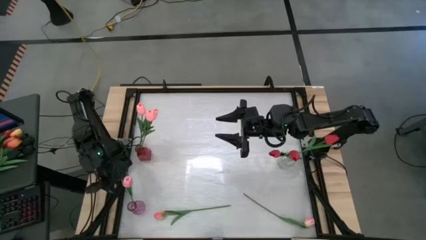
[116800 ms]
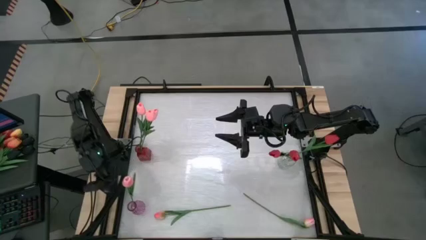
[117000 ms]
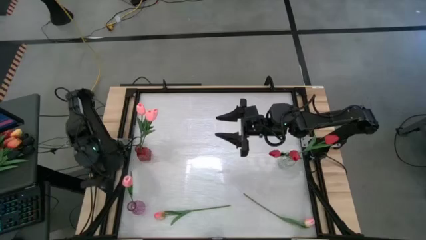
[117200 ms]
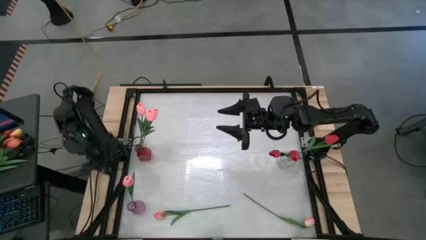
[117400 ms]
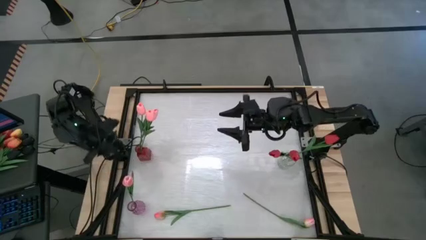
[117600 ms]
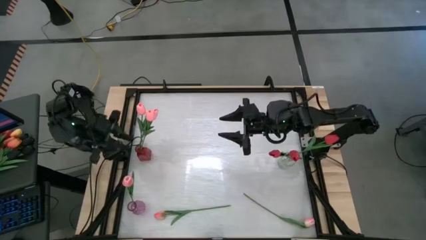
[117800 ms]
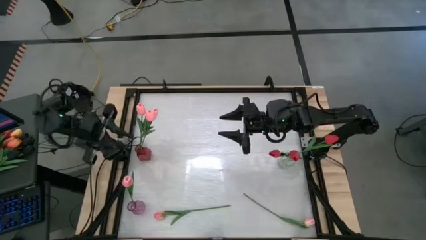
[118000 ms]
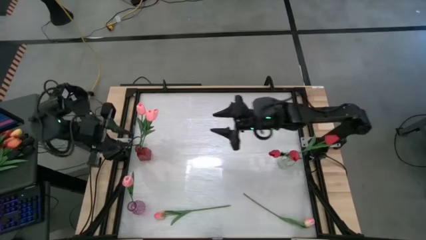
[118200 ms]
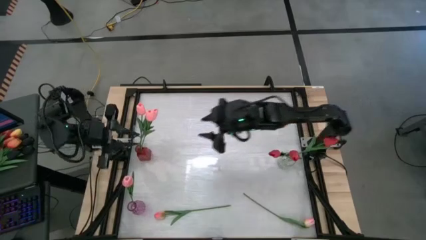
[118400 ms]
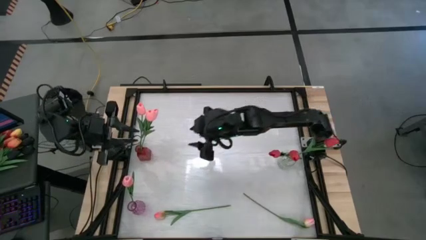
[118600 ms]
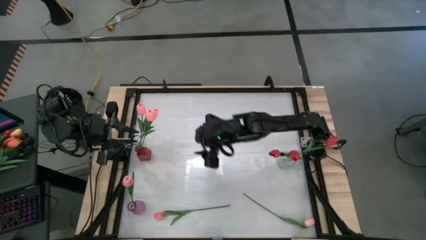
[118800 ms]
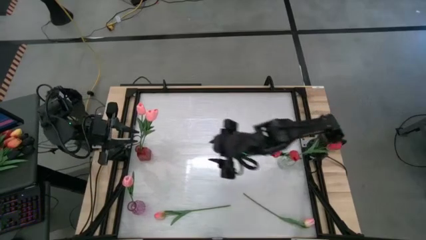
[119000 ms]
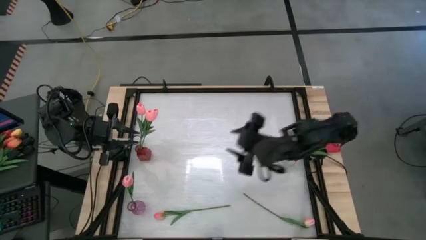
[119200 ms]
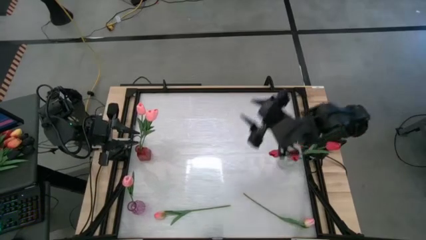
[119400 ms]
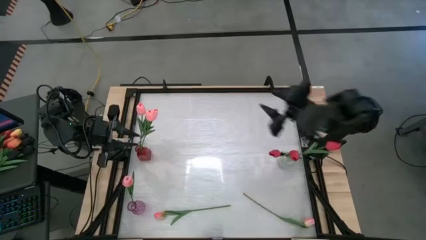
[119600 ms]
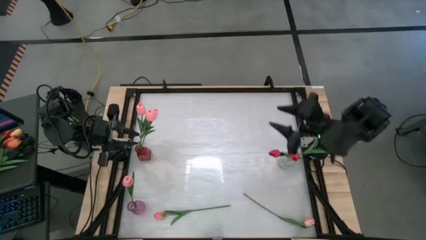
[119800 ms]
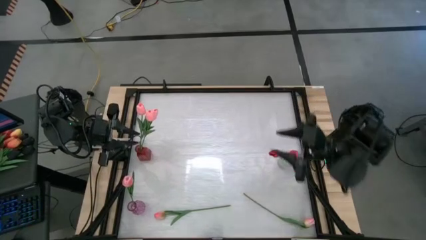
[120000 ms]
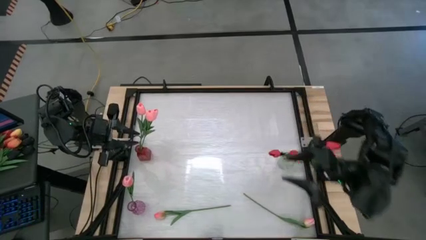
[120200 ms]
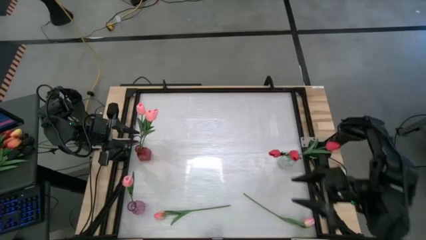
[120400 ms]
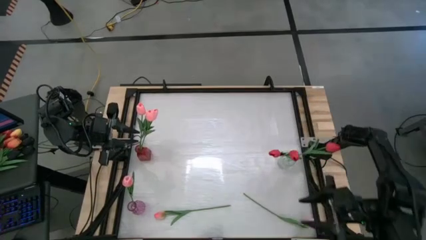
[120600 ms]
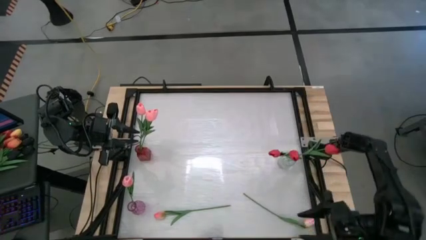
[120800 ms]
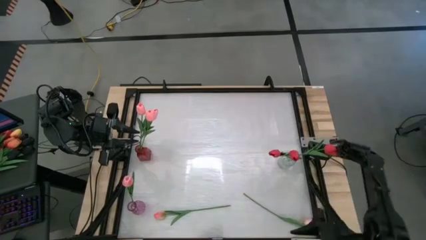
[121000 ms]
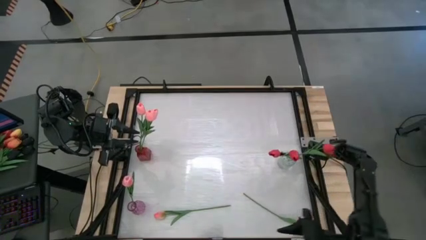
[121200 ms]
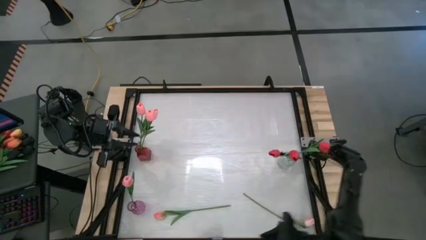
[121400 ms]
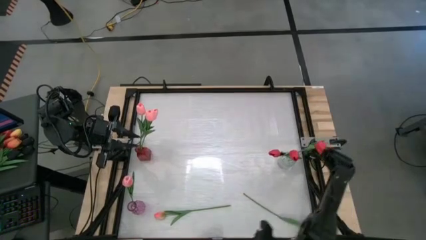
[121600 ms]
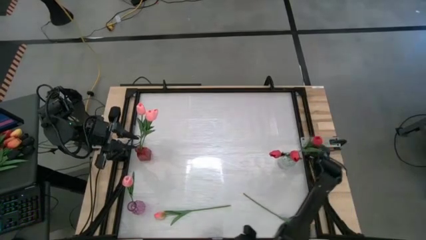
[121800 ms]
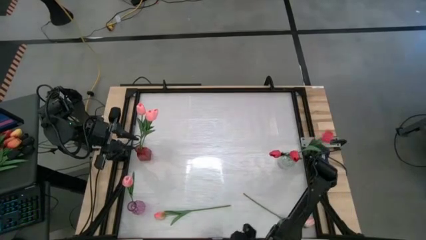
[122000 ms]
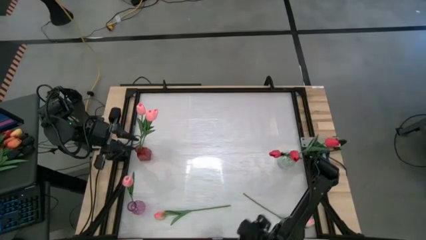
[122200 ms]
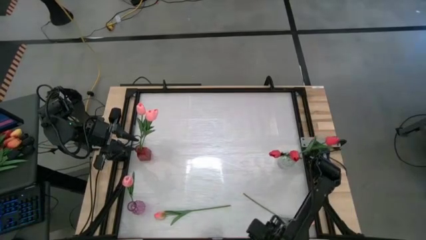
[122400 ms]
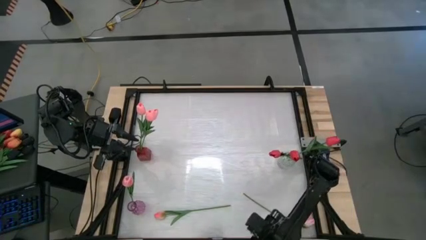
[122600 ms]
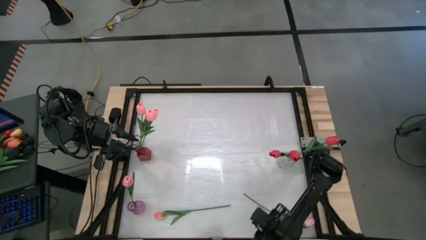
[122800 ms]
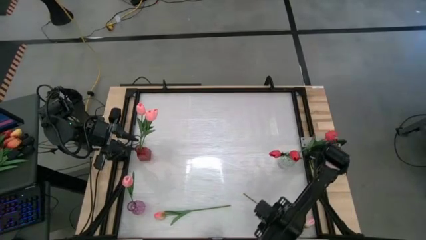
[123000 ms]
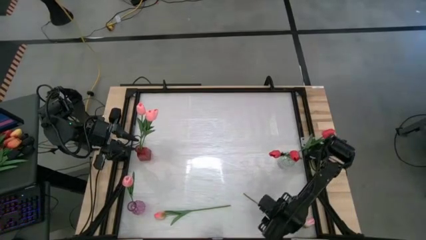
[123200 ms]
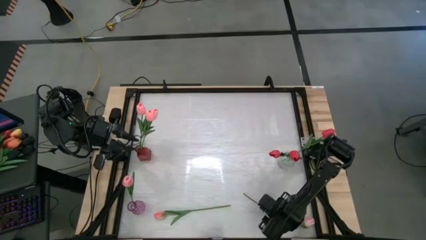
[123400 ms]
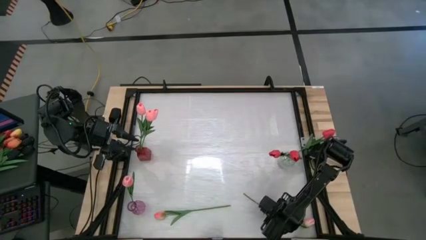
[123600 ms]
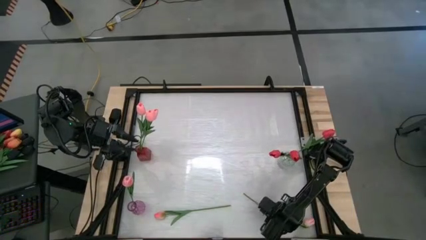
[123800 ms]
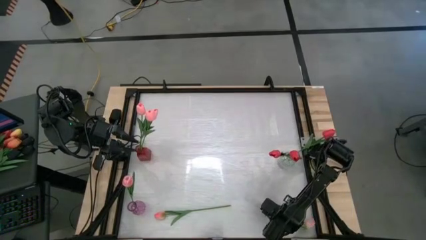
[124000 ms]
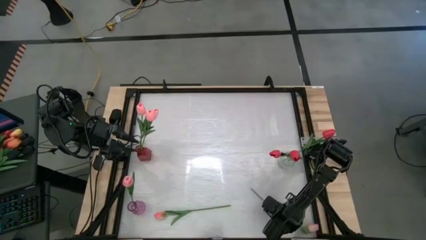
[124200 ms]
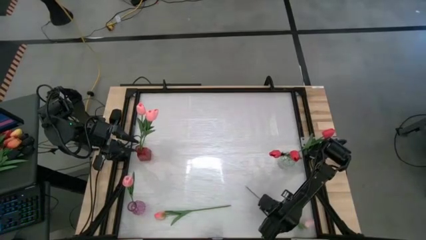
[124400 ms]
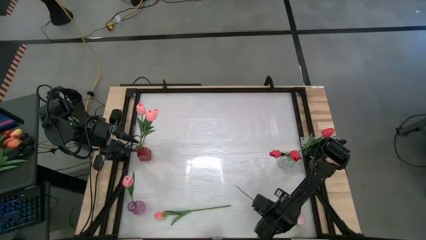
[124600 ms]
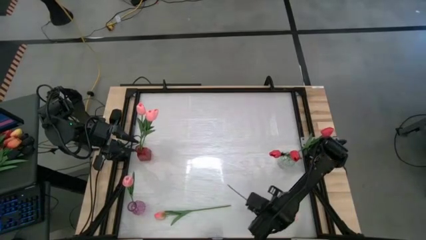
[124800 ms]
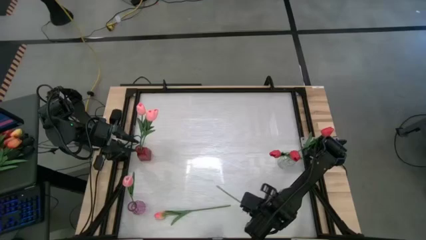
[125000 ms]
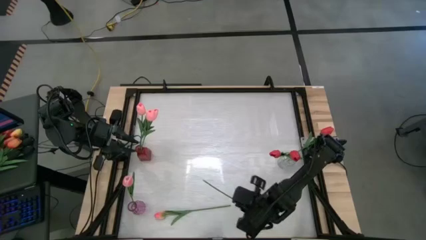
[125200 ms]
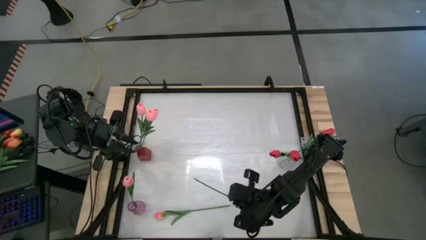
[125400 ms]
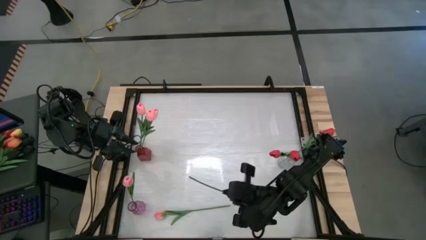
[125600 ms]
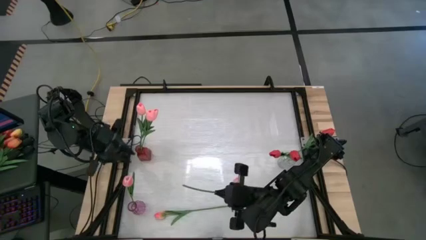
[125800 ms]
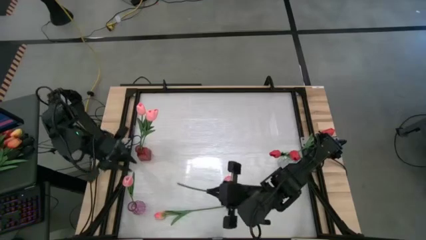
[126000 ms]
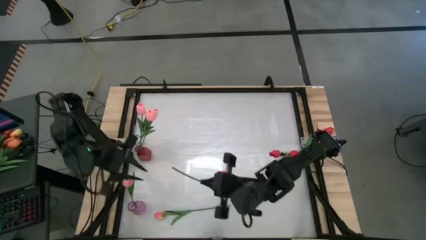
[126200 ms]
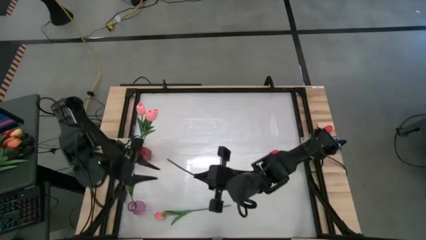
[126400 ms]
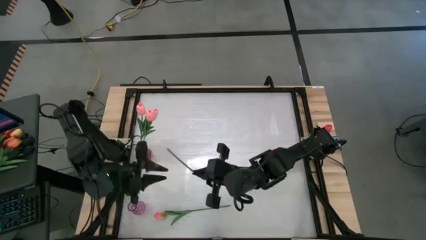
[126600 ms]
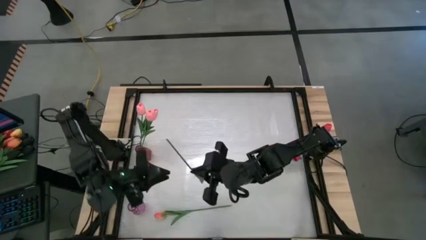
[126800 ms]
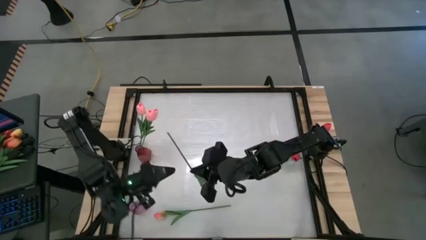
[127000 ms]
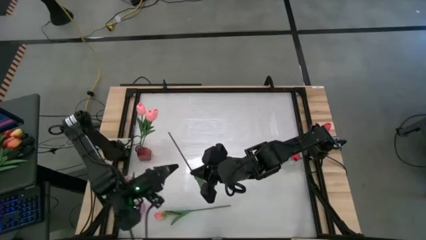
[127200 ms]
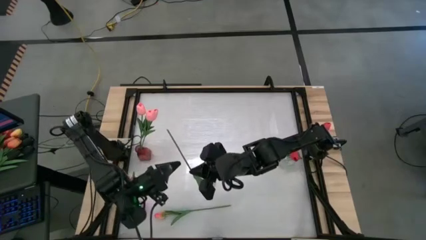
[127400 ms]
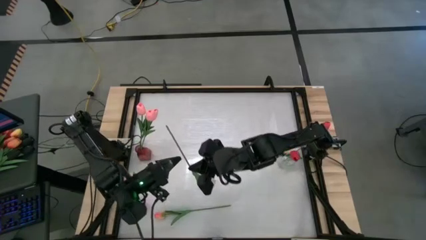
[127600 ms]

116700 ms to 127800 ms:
Task: Sort flowers into vase by color
Put the right light pink flower into the purple flower vase
